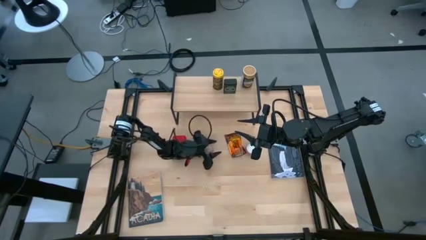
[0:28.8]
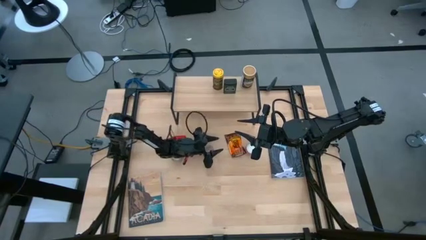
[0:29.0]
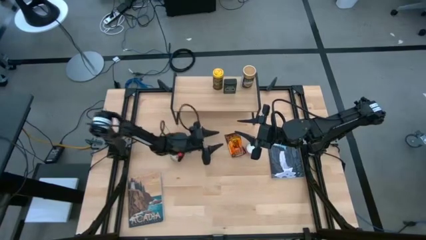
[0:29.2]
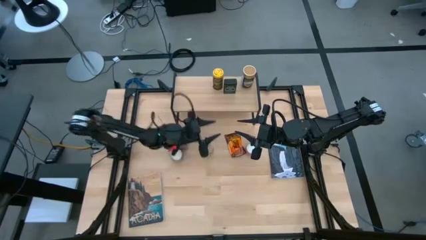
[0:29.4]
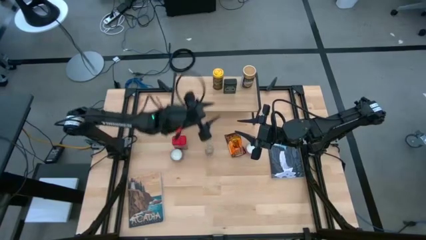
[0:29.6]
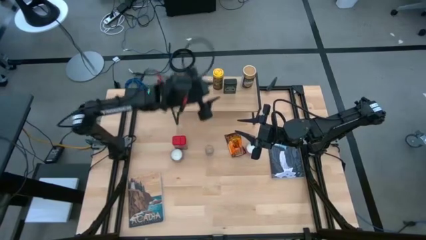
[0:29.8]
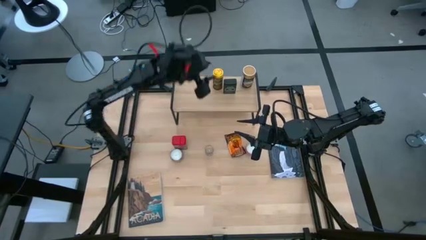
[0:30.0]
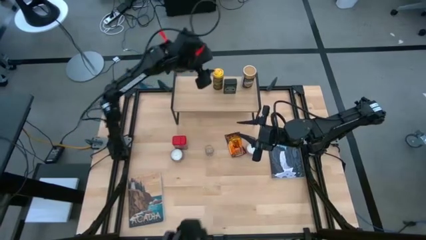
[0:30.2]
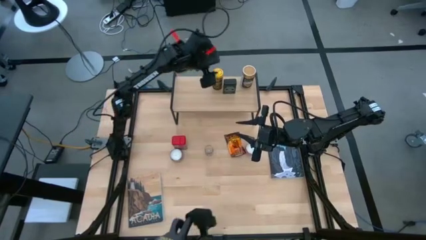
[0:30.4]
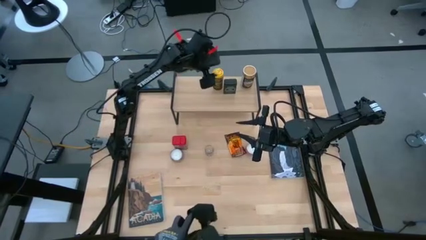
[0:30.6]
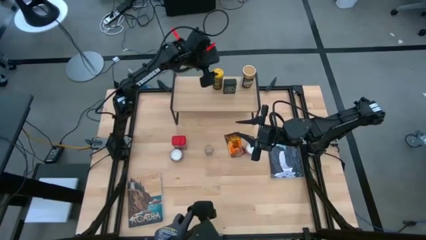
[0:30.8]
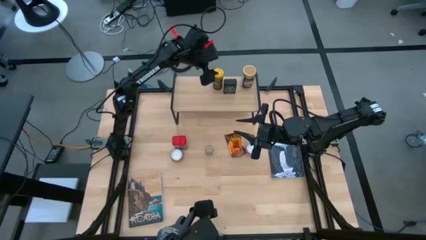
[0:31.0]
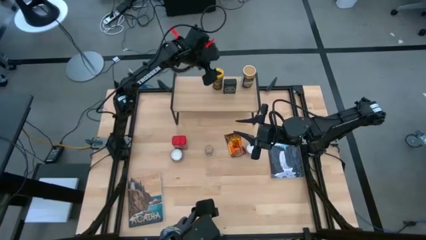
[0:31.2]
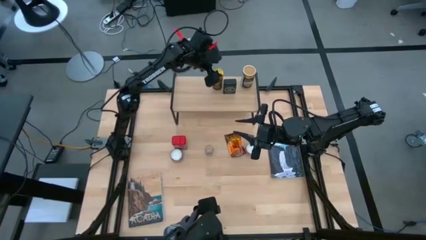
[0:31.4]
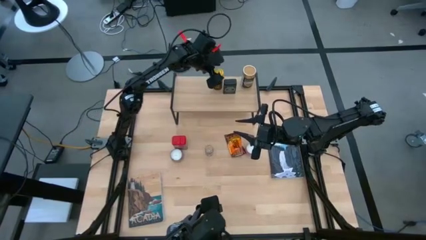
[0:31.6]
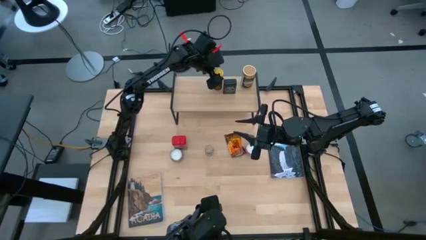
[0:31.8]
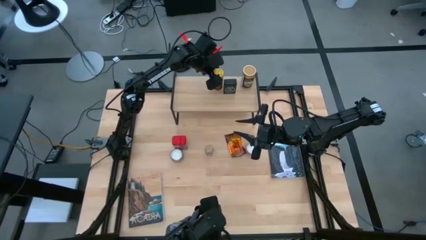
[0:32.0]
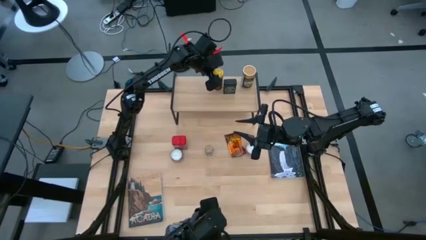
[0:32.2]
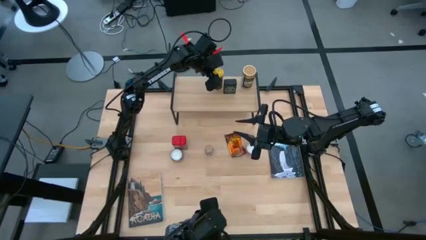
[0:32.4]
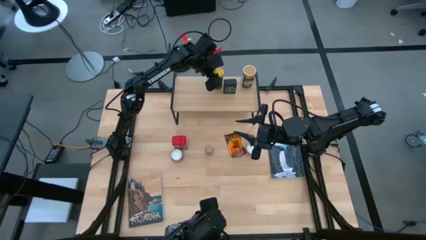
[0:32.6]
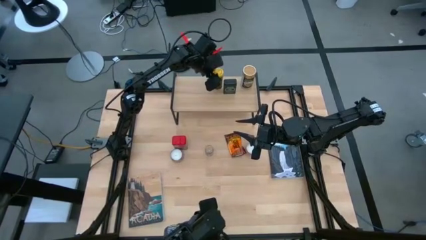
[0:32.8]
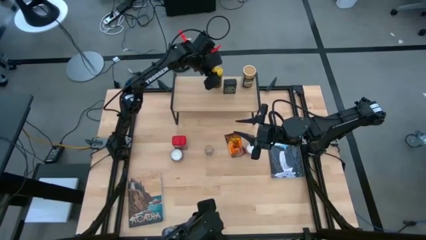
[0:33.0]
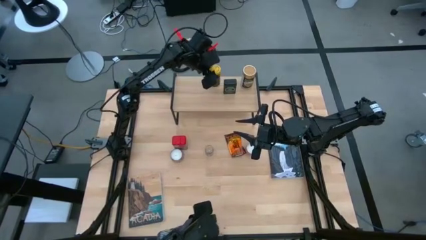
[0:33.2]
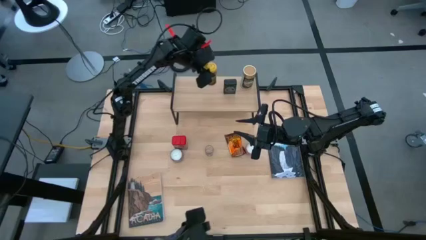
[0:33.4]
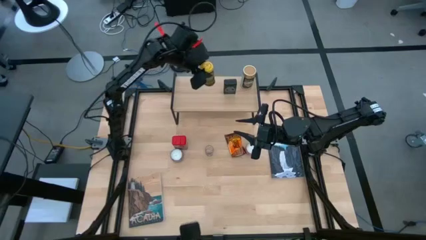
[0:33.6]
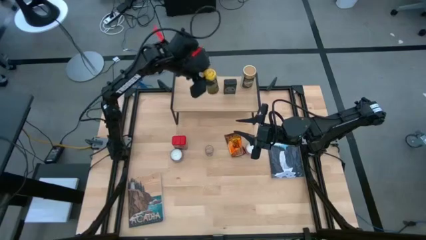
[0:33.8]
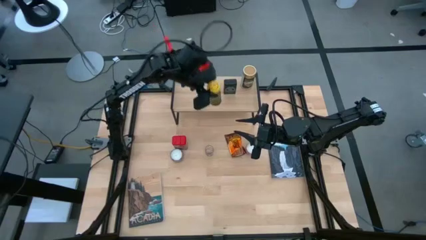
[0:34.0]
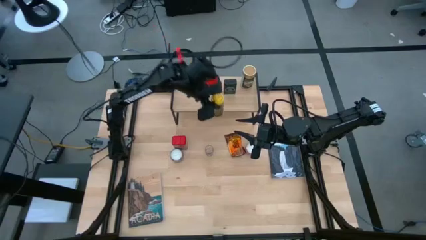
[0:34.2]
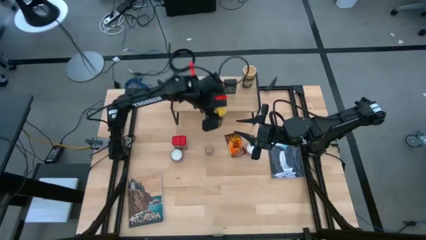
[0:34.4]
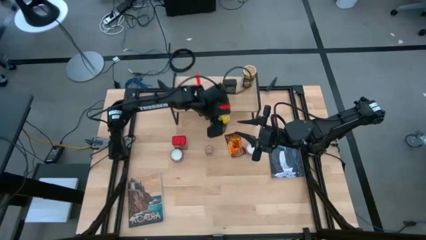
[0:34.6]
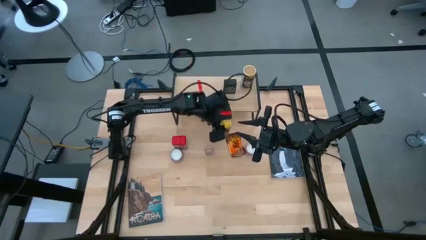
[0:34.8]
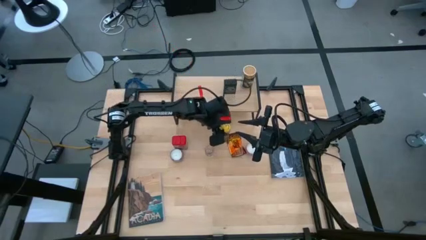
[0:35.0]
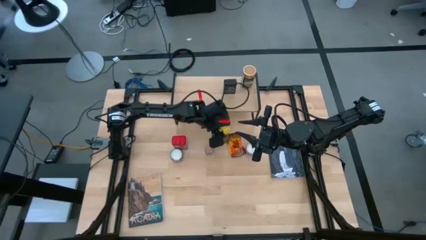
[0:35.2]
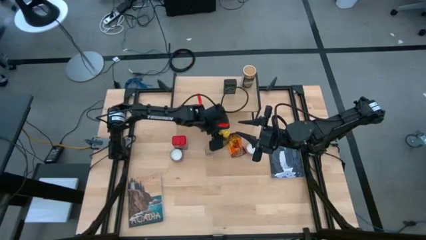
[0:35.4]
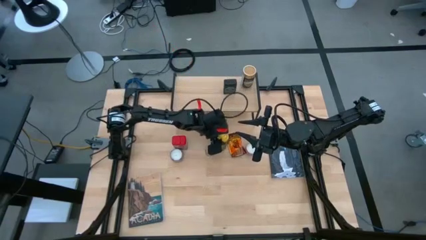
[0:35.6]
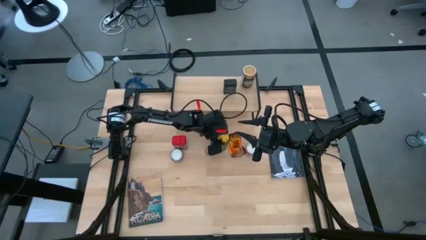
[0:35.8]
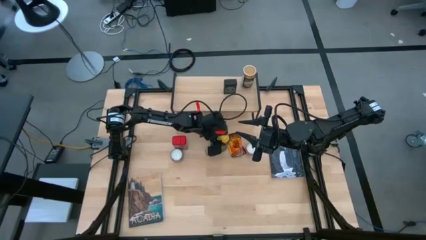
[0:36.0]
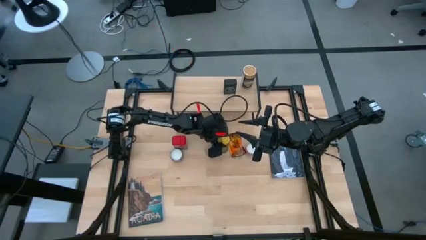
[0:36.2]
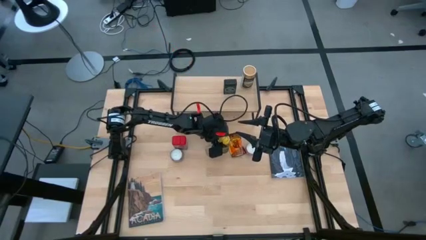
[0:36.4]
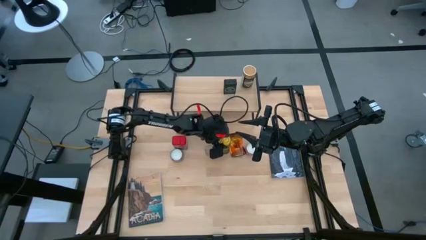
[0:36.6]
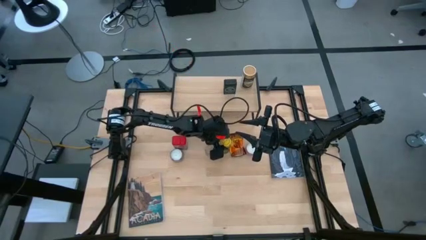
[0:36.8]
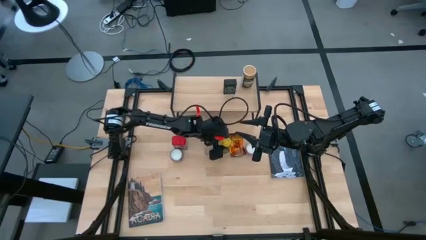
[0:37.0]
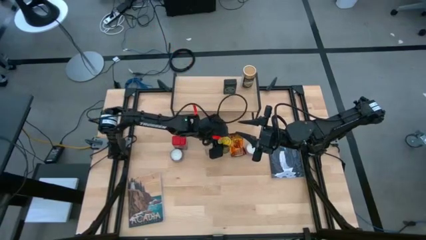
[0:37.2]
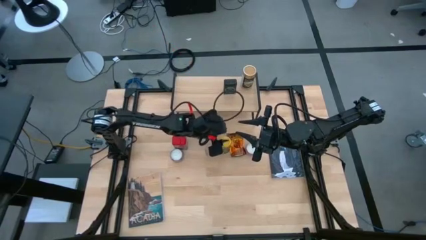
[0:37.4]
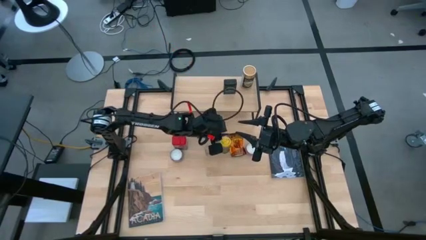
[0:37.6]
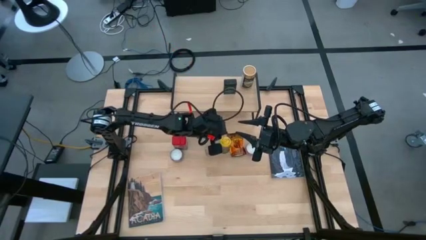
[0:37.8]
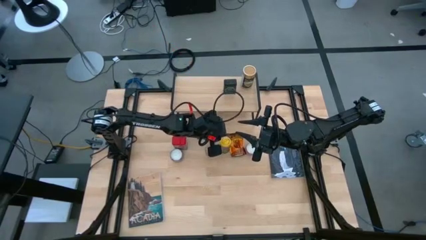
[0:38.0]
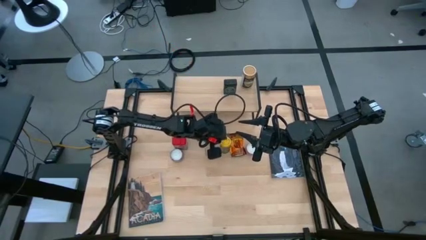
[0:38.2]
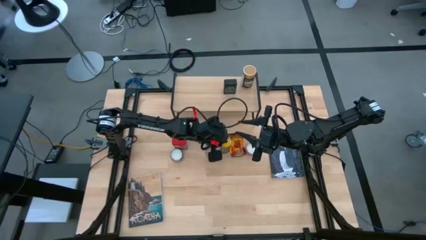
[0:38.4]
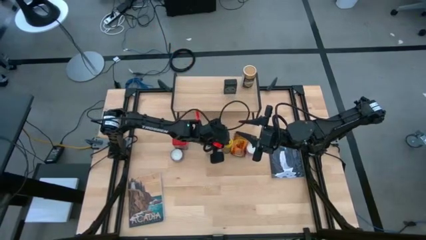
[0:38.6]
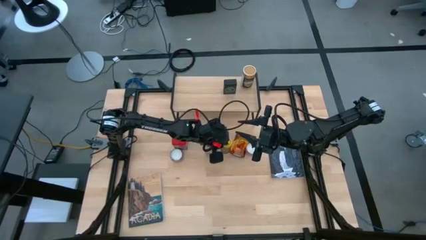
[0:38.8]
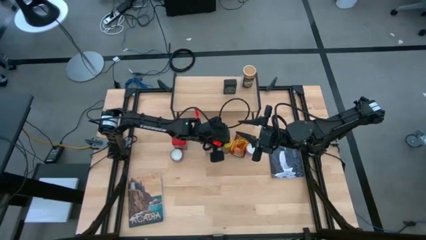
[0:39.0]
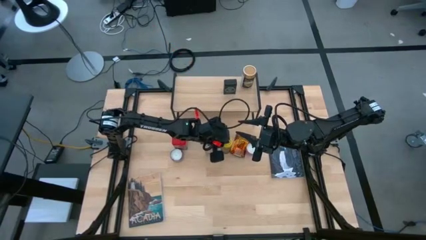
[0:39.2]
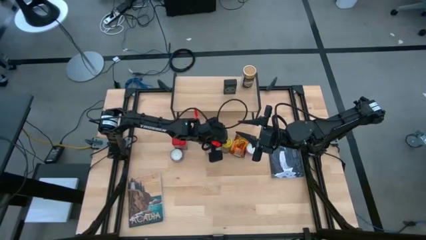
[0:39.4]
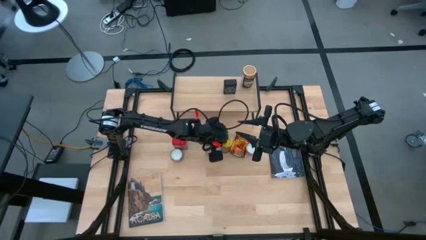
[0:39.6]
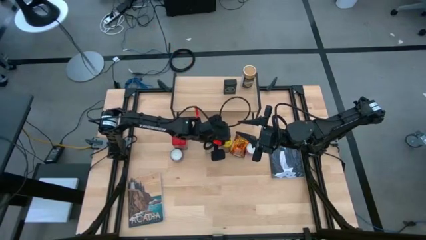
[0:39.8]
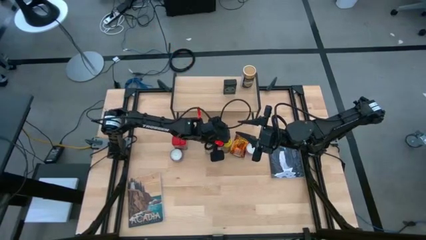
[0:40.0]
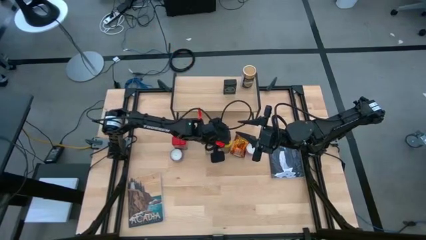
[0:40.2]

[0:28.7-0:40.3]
Task: Shelf spices
Remove the yellow seasoning bottle from the shelf

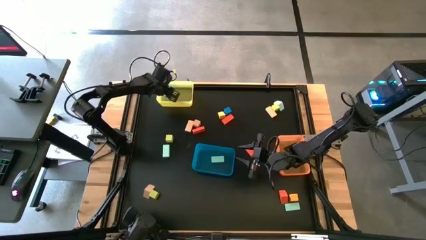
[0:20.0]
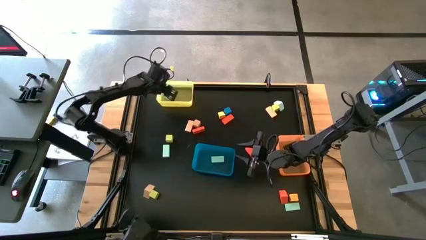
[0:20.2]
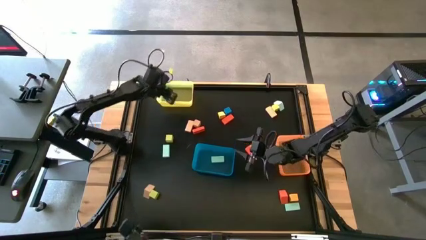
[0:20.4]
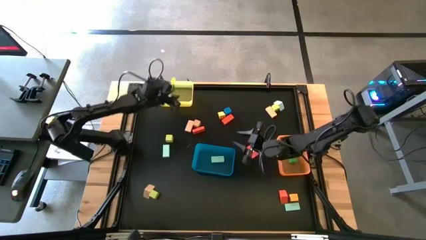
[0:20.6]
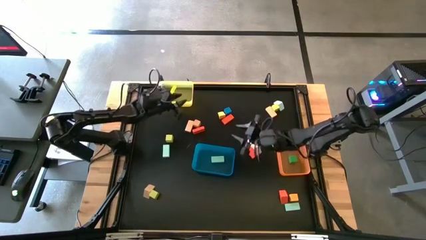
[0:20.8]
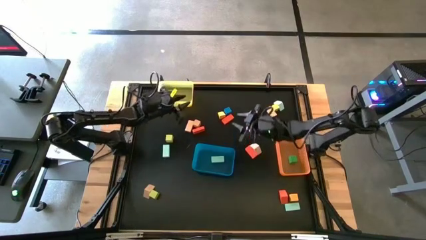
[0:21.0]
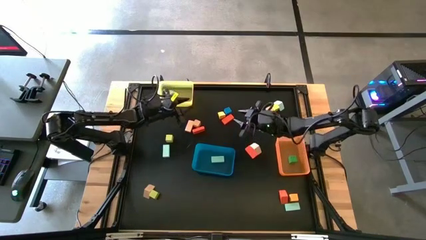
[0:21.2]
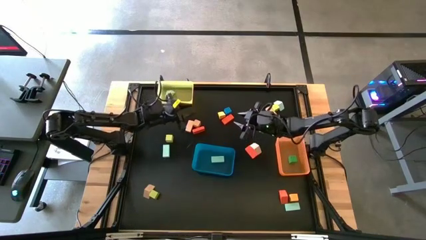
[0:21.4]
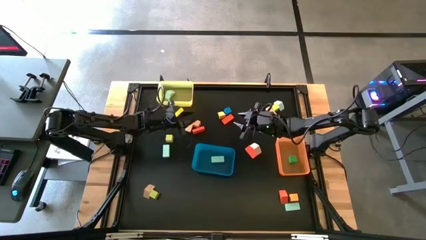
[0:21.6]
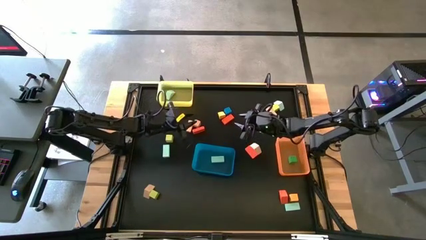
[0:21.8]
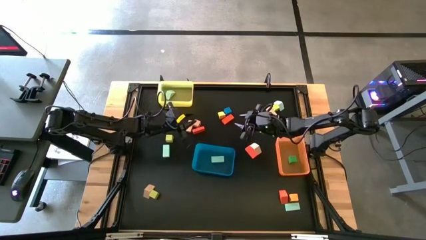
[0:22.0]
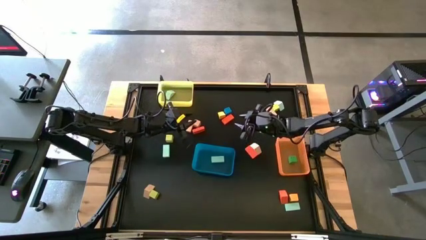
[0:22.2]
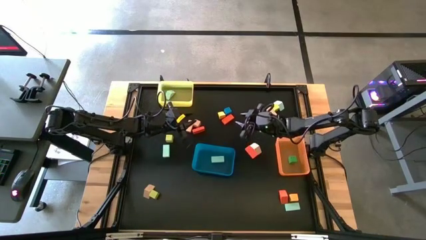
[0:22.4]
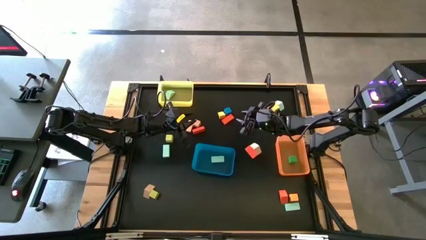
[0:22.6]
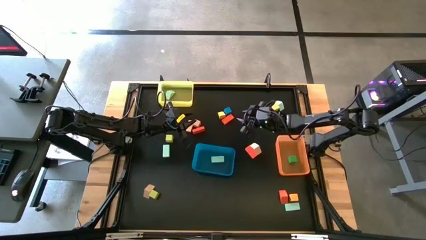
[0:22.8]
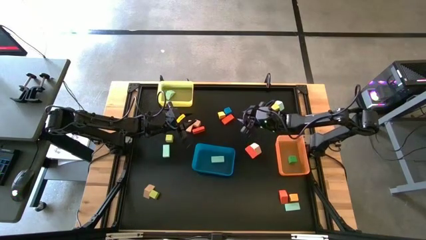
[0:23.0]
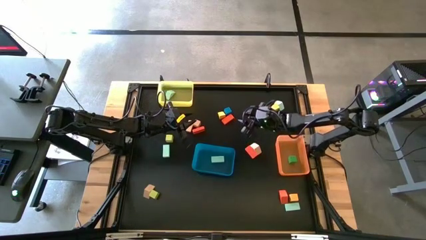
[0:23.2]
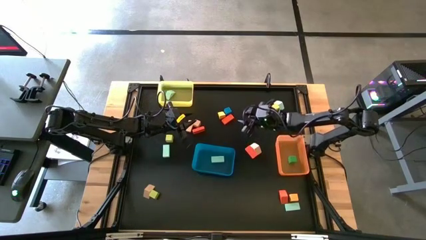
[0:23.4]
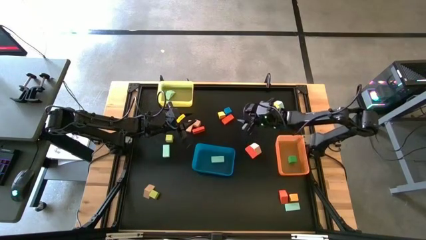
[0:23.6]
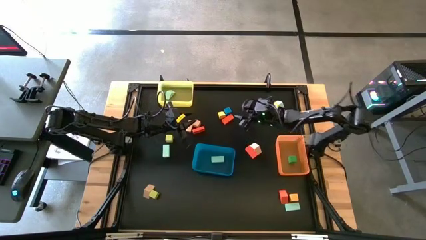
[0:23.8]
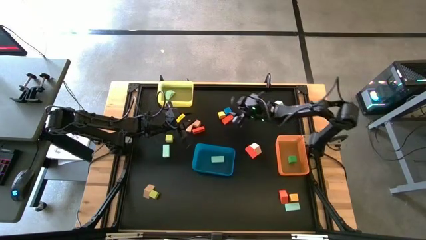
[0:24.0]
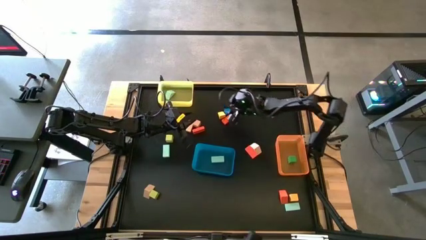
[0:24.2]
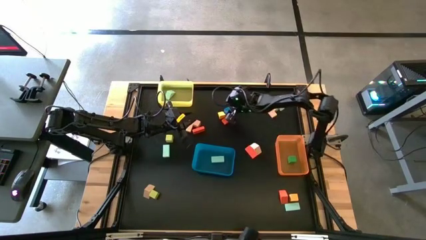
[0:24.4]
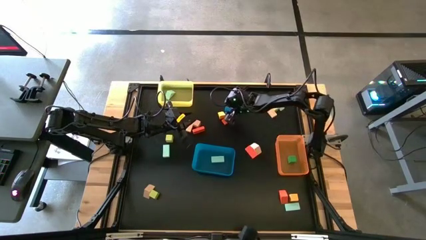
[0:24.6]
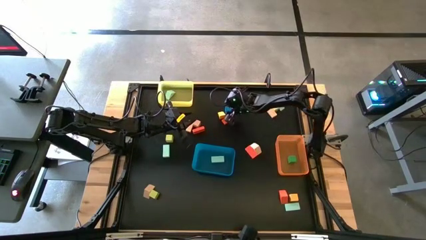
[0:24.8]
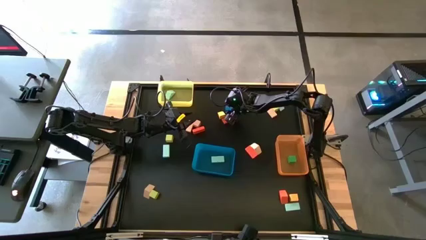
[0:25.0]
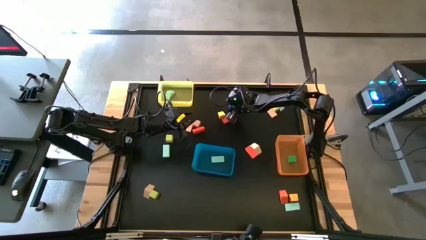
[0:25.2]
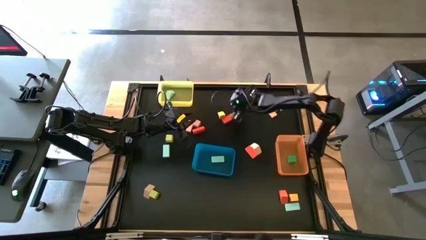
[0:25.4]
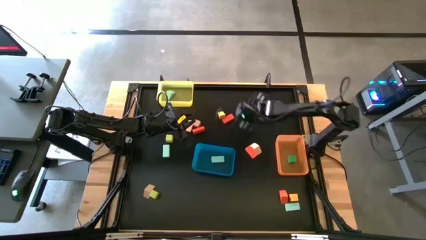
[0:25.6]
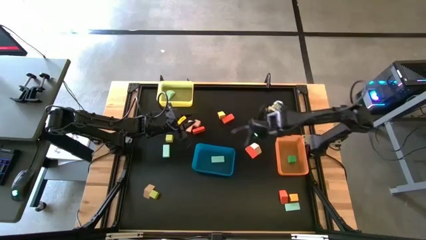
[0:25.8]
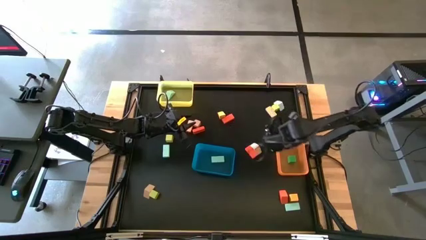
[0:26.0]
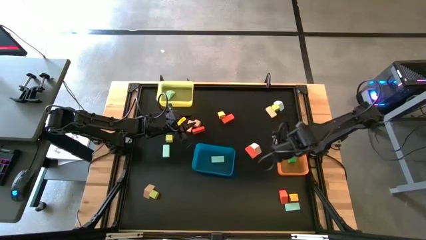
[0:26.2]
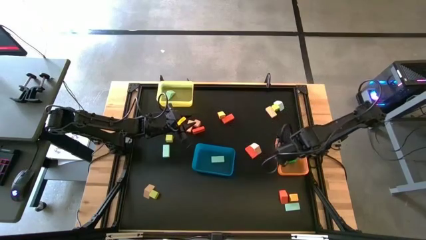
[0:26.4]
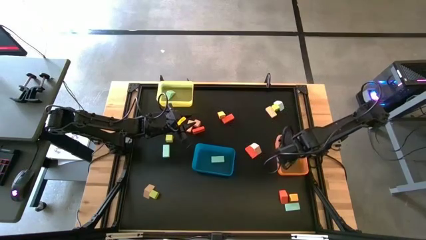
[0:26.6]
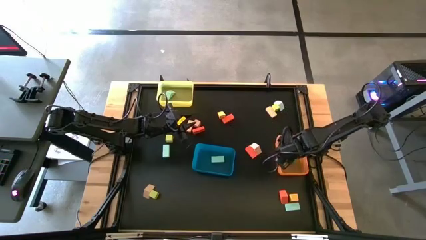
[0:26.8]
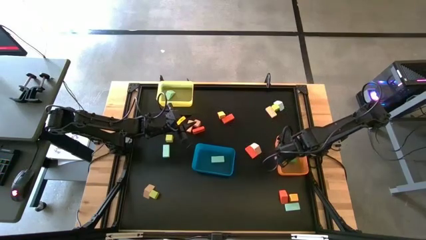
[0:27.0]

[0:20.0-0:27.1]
Task: Sort blocks by size
Put the dark blue square block into the orange bin
